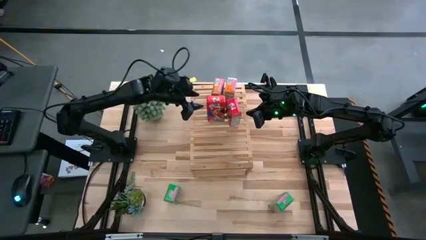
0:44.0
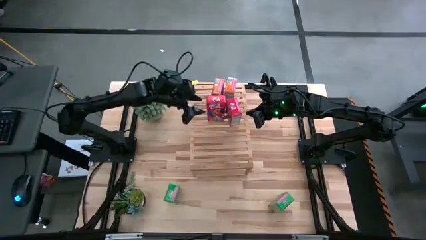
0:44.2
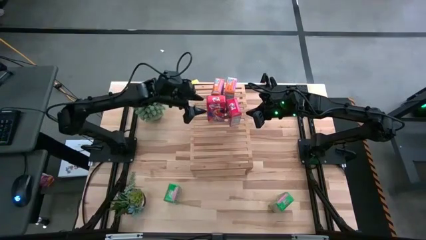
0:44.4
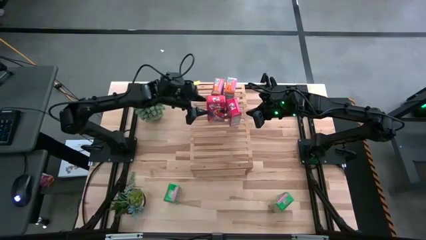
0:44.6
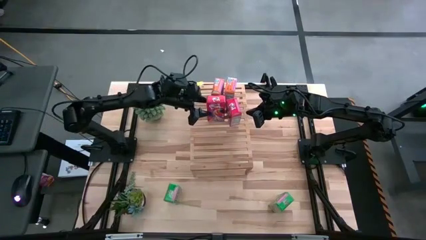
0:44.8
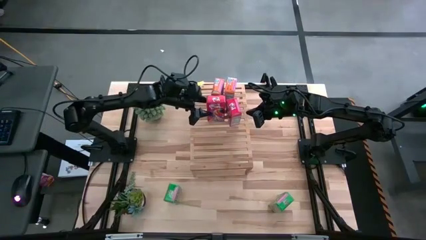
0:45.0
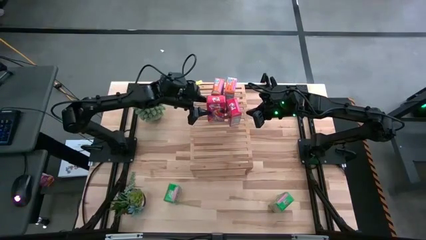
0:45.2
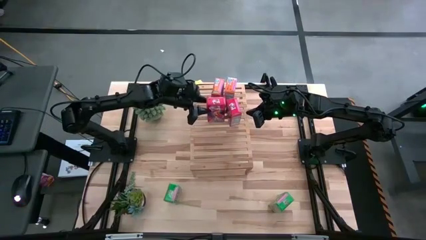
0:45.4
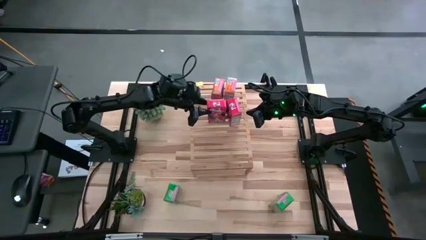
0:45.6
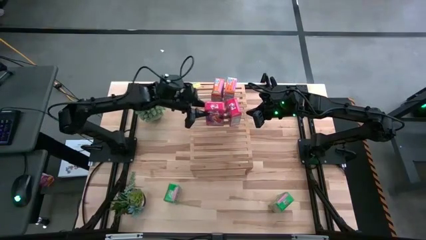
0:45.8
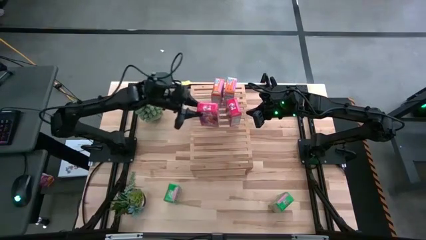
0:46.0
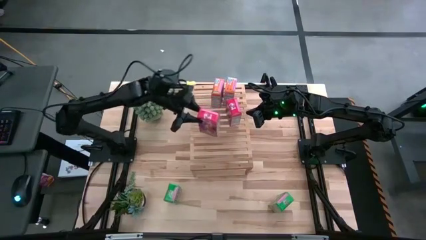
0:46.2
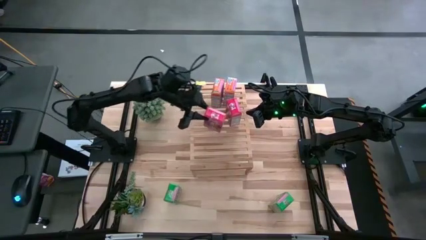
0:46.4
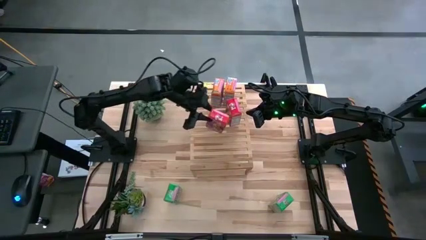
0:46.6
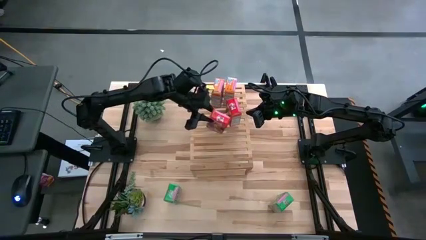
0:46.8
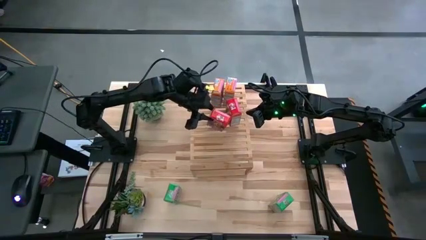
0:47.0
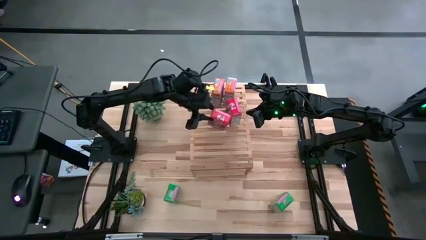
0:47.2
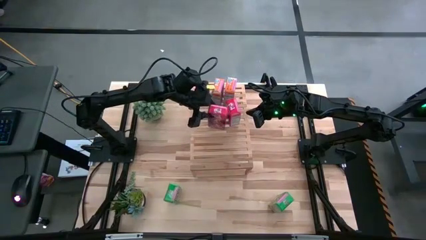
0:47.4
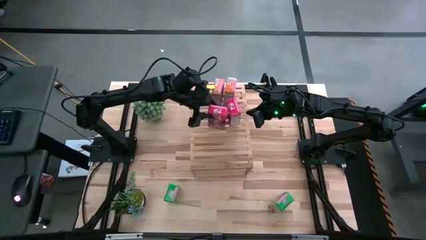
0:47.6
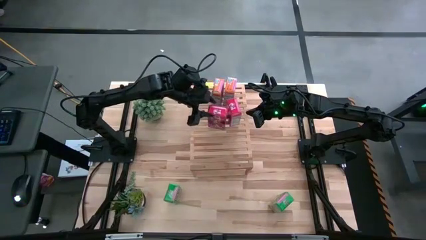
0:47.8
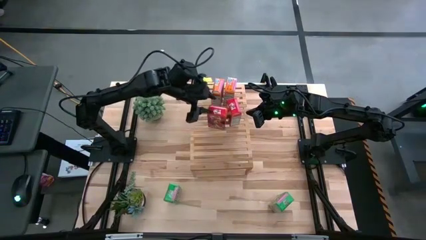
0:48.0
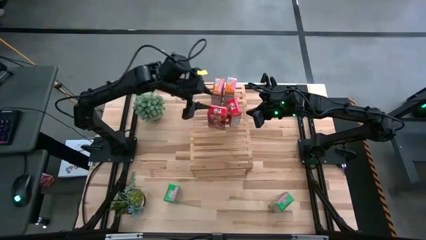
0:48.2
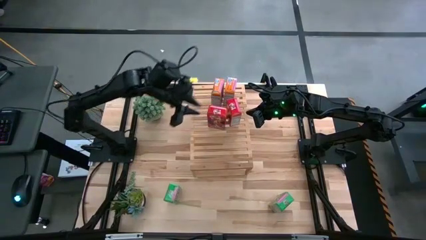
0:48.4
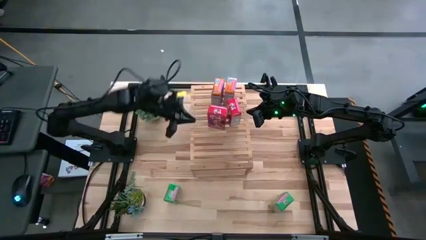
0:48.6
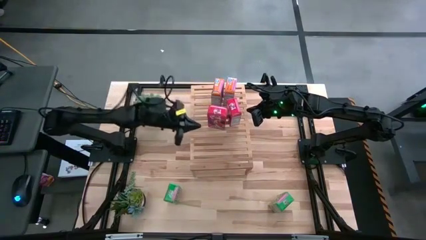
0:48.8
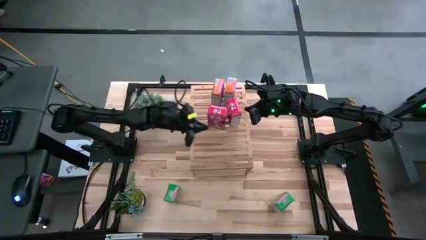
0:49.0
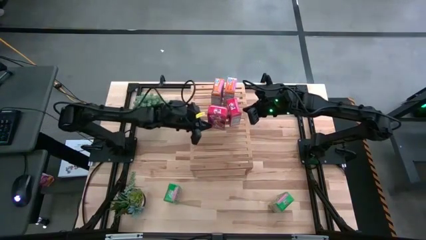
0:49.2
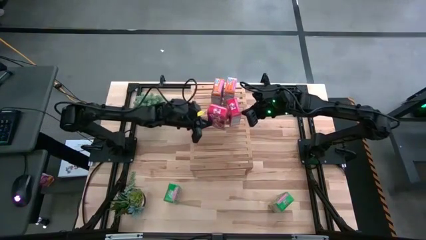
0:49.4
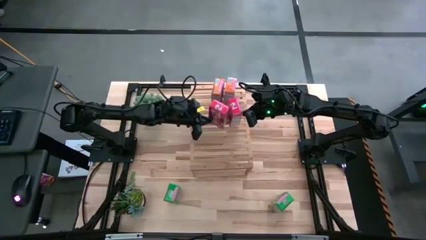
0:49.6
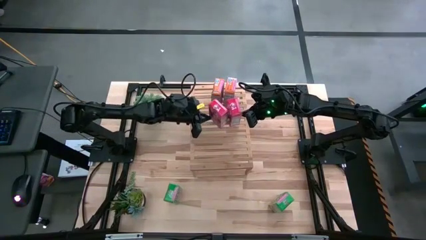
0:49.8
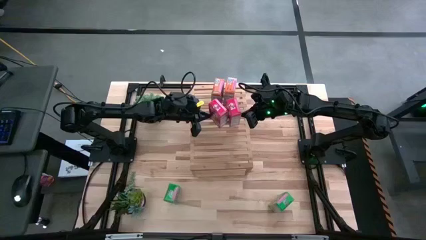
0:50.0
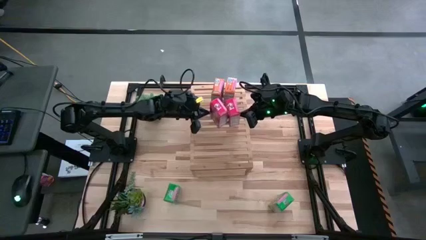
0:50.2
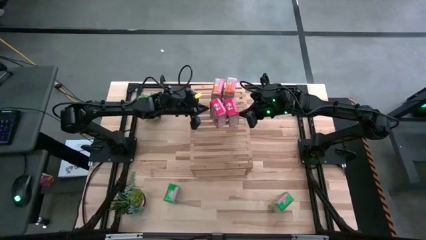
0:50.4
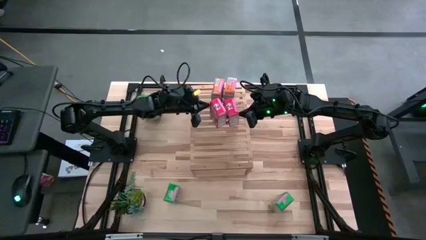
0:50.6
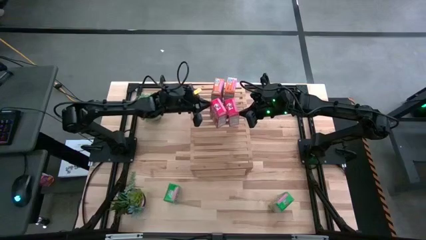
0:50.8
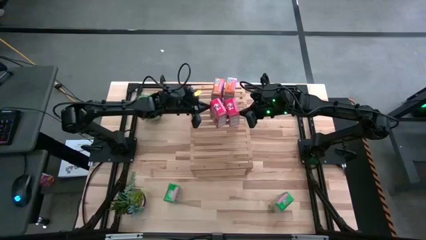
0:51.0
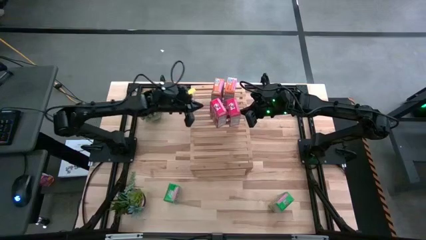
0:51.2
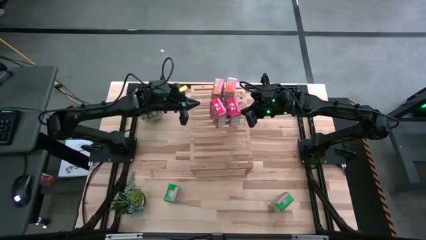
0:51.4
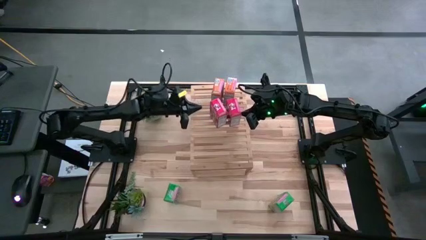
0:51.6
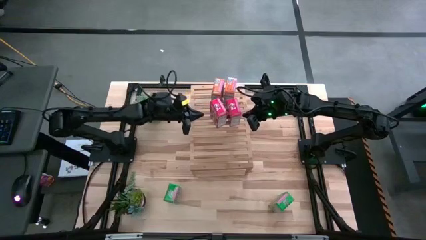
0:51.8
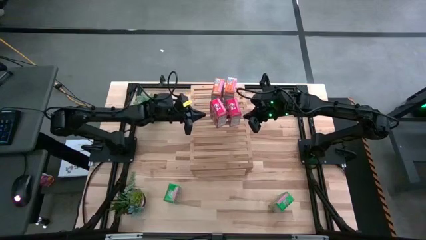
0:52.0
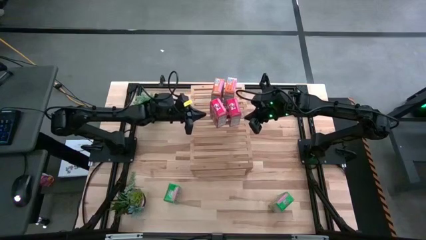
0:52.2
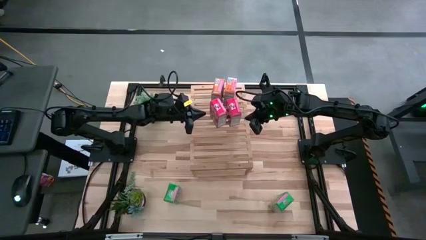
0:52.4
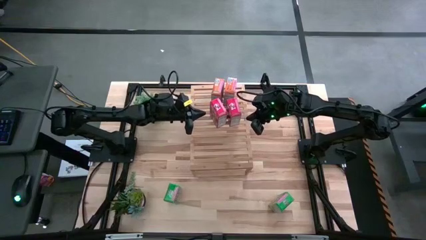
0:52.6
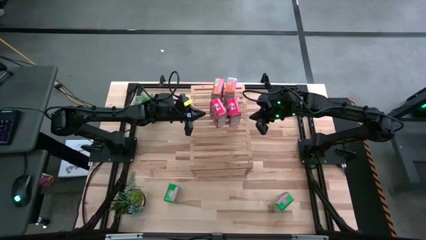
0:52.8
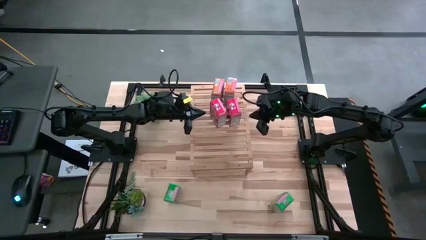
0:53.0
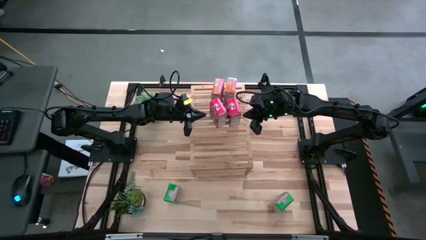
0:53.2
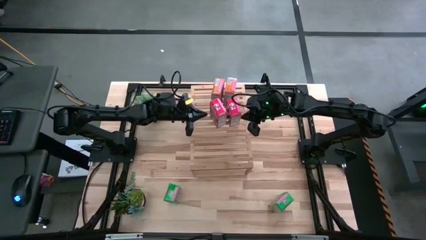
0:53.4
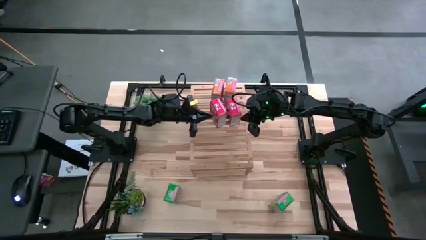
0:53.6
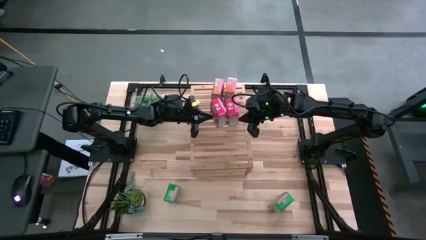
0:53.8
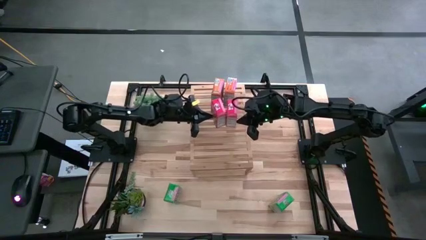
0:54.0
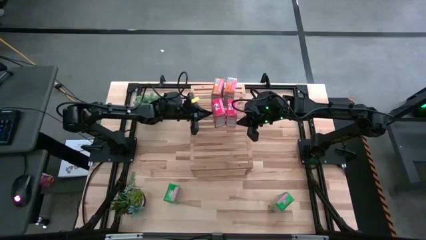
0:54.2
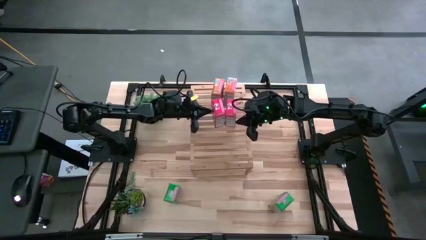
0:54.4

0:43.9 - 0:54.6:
Task: Stack cereal on shelf
Put the red cereal box aligned with the other red cereal box on the shelf

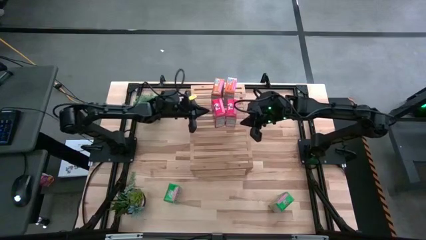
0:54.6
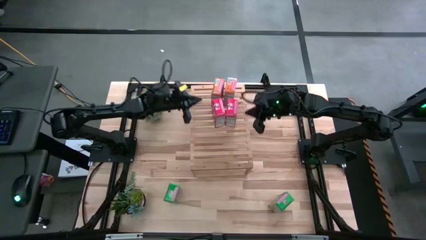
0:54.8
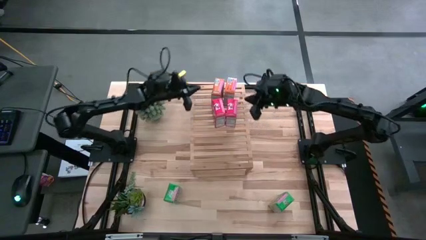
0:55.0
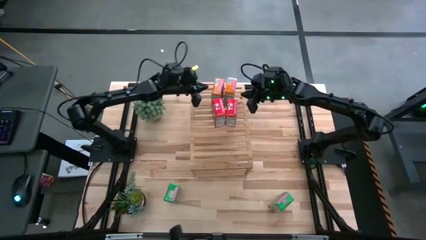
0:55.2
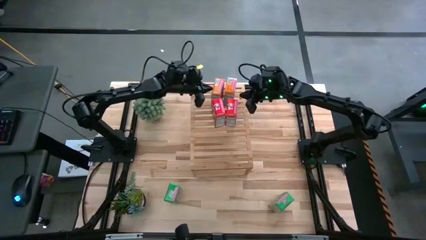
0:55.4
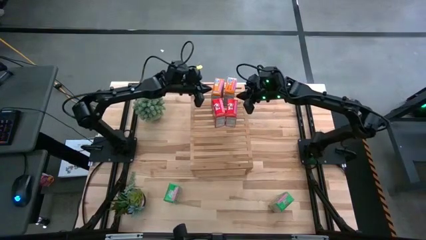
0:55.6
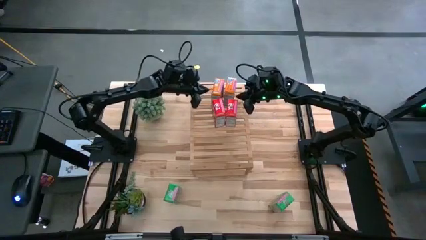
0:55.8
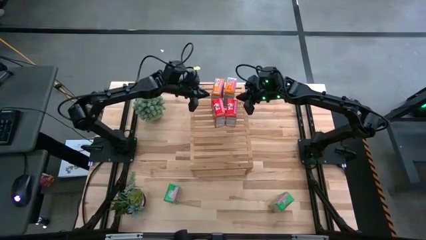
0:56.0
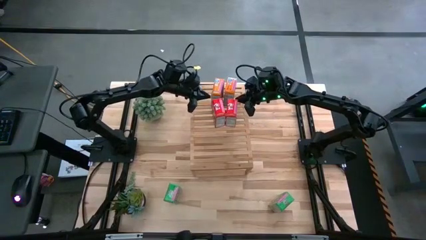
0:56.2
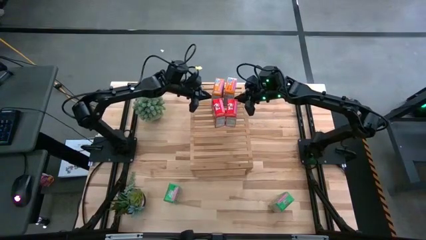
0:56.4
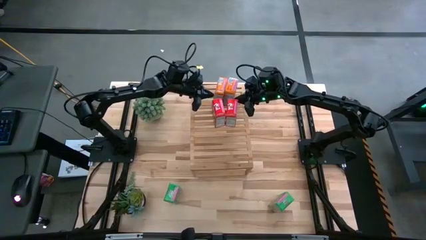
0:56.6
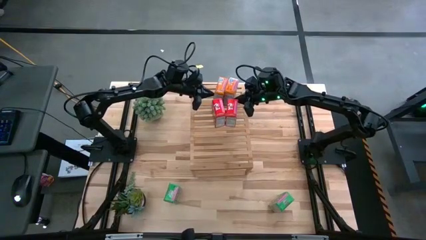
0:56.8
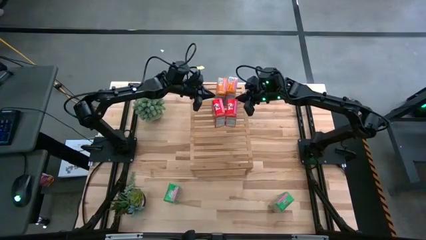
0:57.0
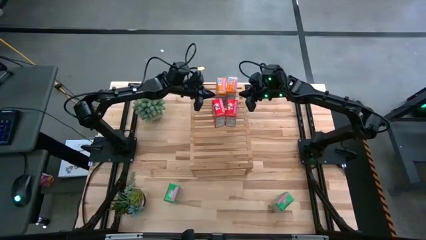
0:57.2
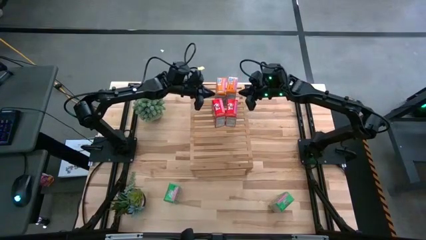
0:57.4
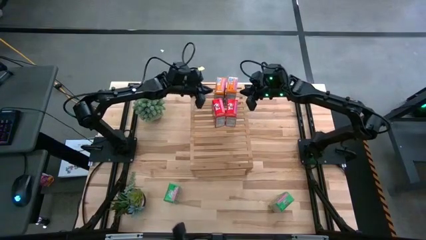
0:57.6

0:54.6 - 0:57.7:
Adjust the orange cereal box
